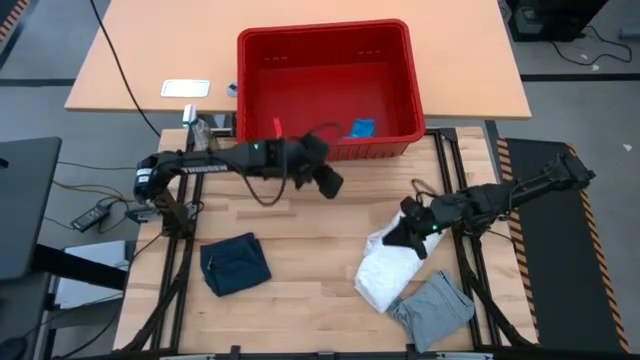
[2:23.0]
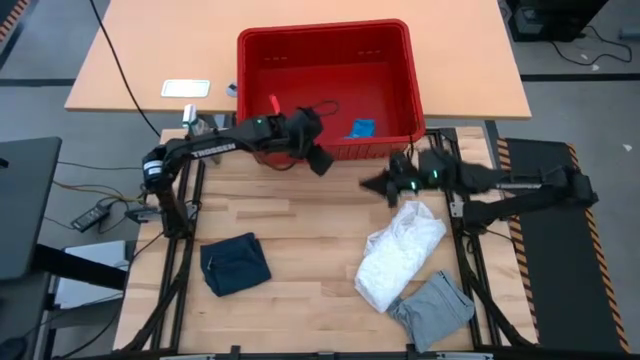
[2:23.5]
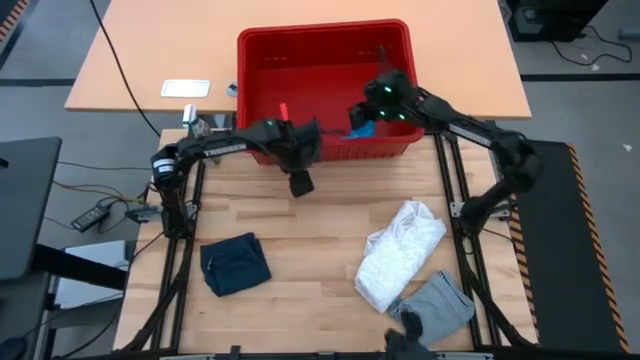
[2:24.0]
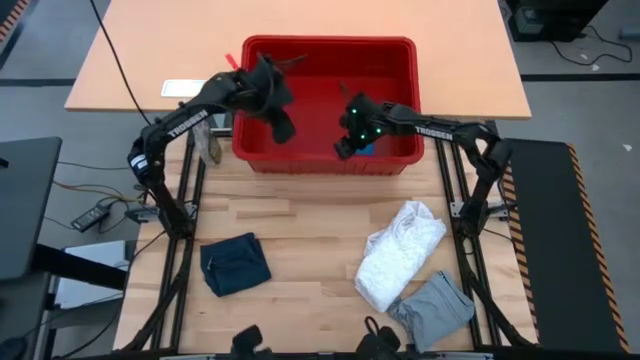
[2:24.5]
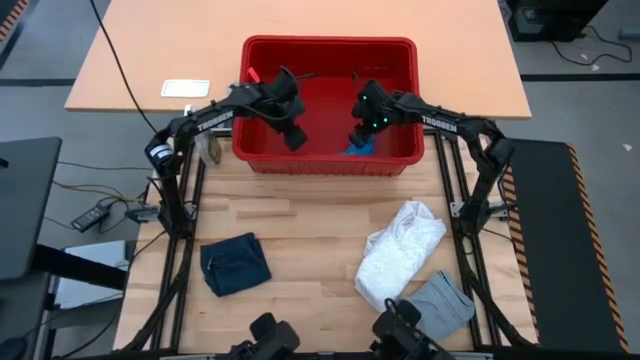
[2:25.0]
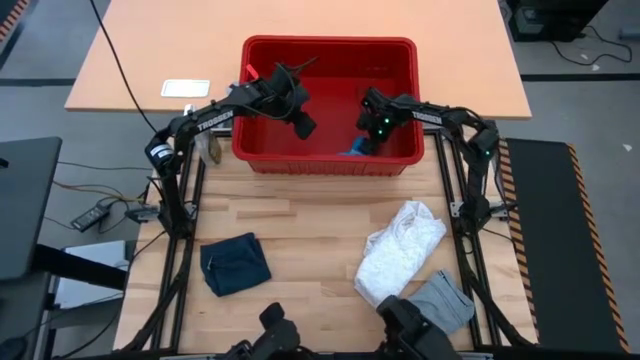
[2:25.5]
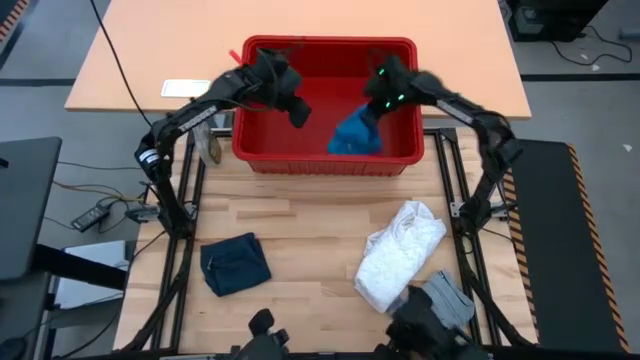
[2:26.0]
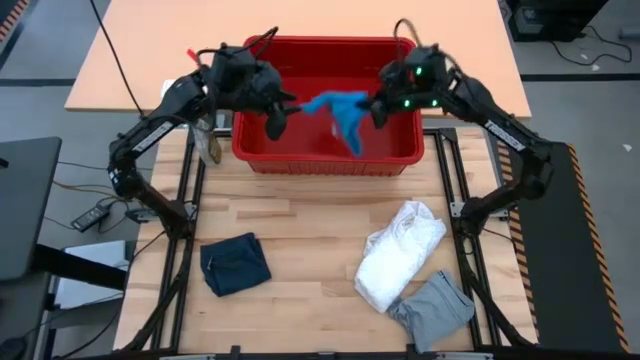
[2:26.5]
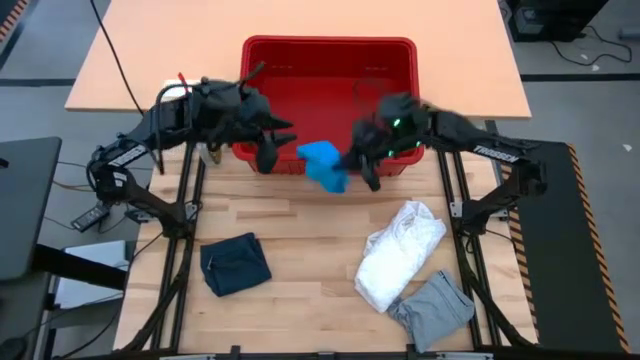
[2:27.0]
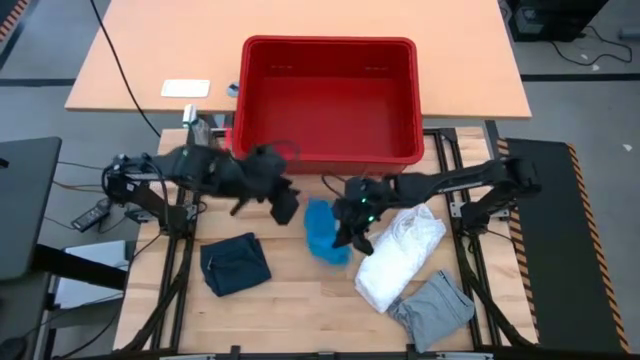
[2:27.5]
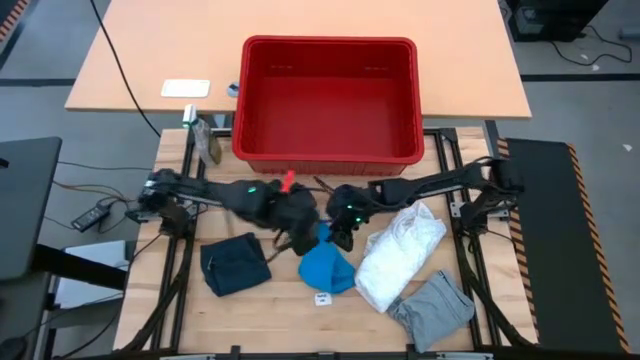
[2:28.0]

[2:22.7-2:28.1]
Task: Fold laundry
Remove the blue underwear from the red laundry bin

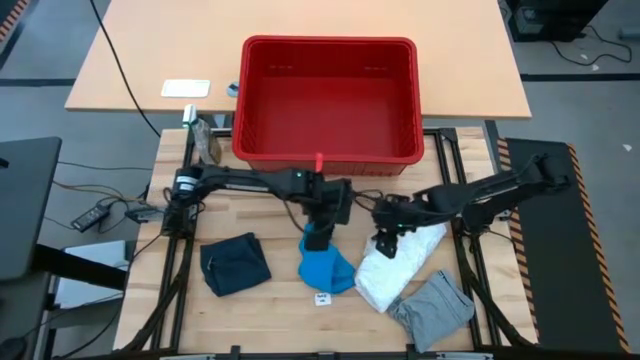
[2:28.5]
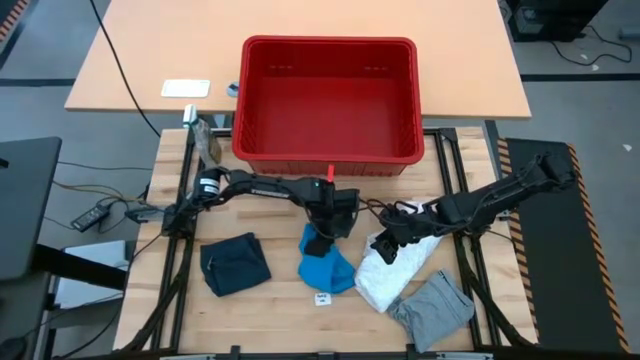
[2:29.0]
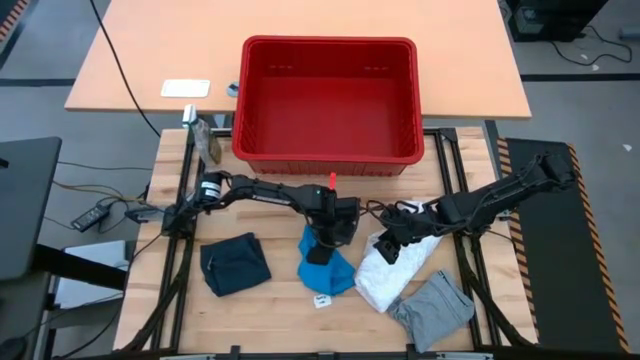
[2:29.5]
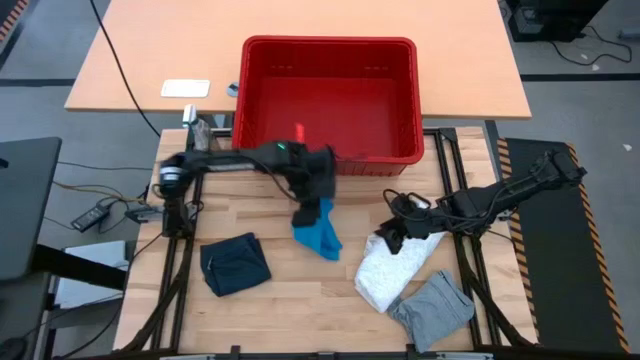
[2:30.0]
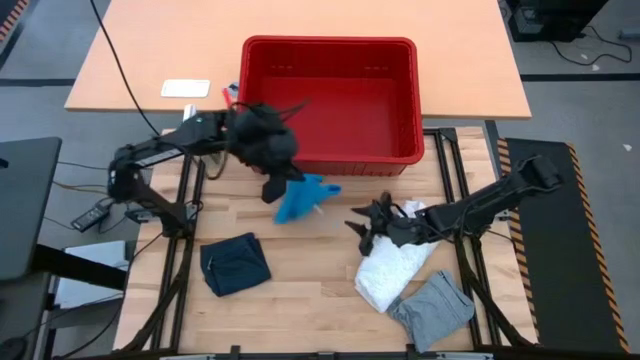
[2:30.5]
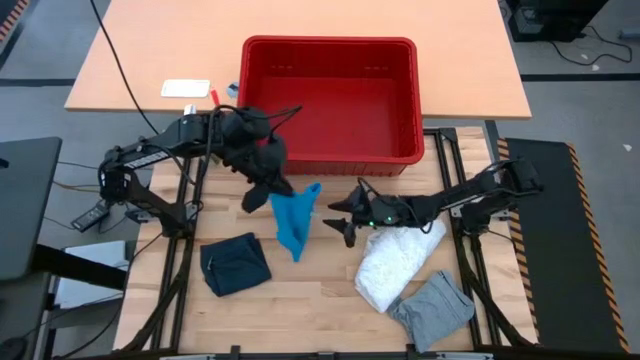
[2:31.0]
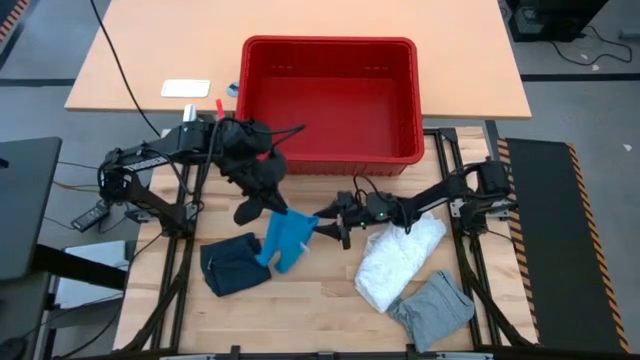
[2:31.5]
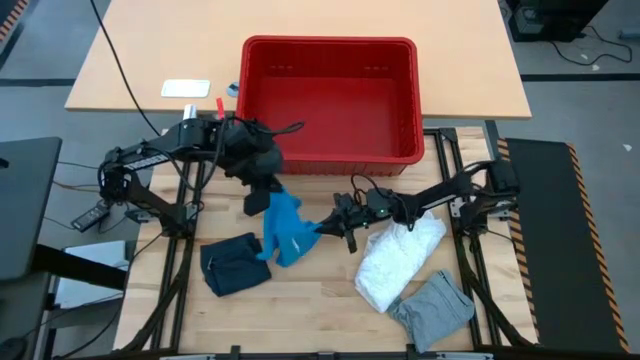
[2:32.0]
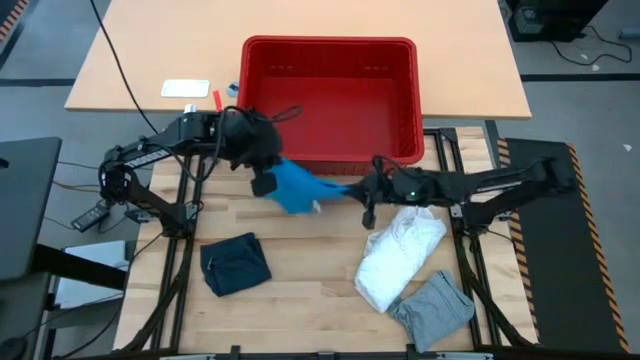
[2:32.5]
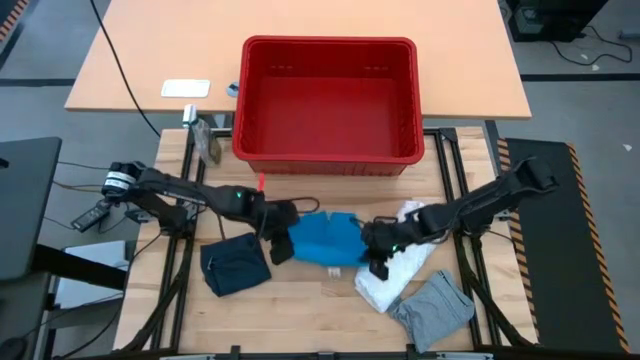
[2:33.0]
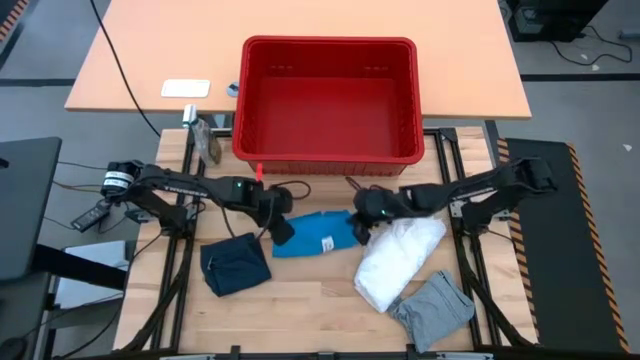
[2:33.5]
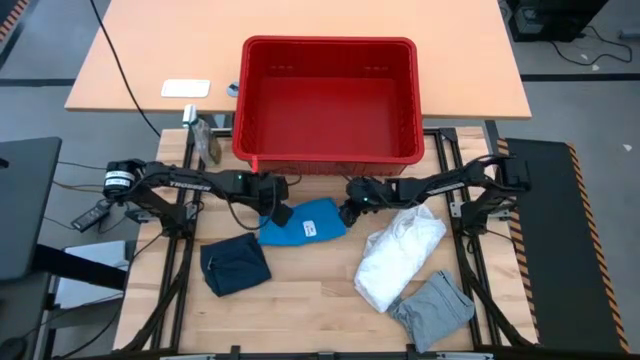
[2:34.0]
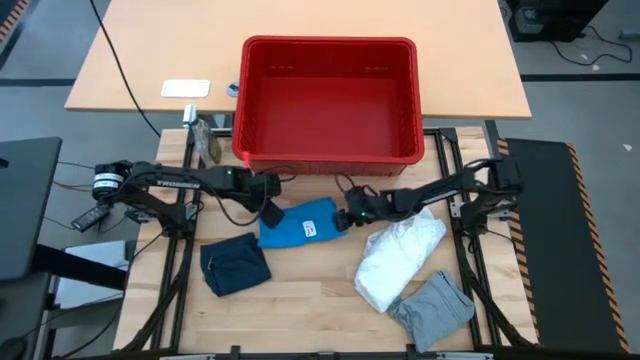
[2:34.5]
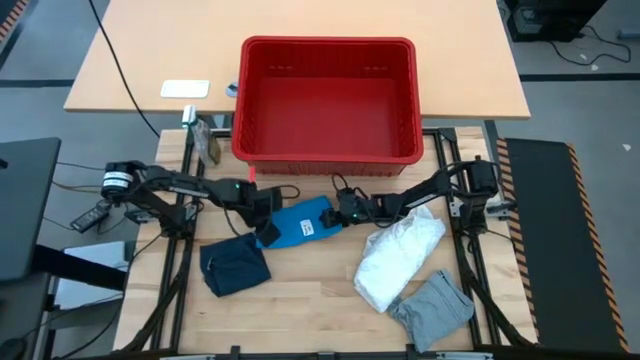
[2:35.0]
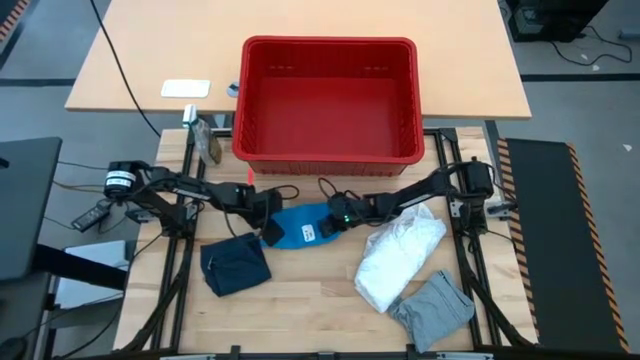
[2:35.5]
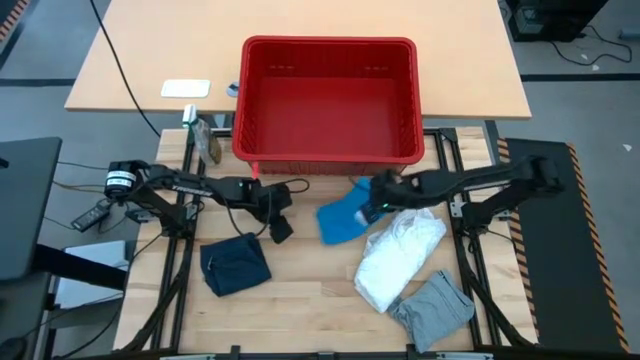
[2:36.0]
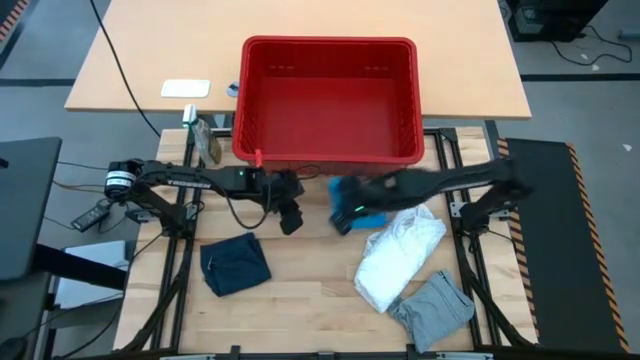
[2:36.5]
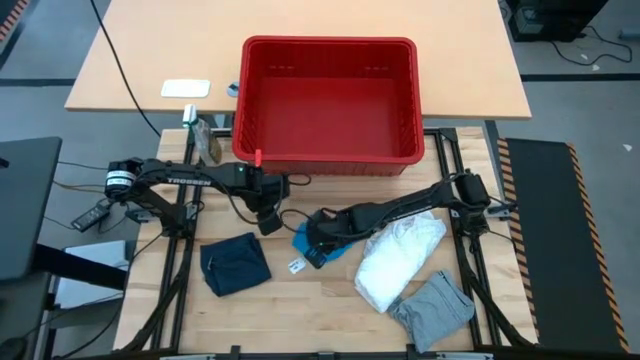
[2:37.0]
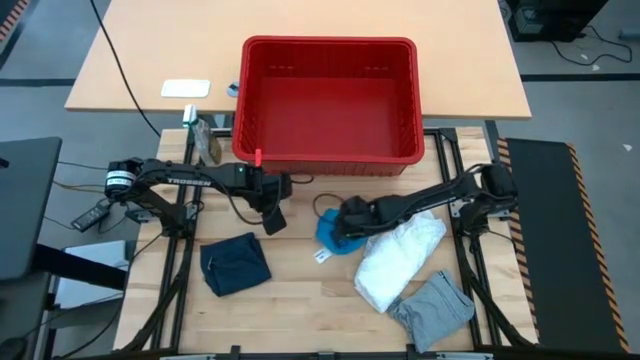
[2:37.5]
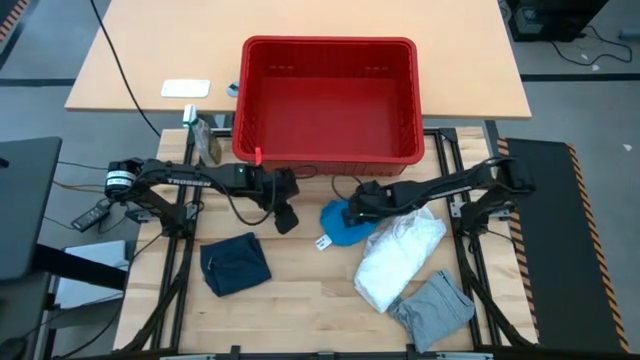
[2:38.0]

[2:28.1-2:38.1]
Fold the blue underwear

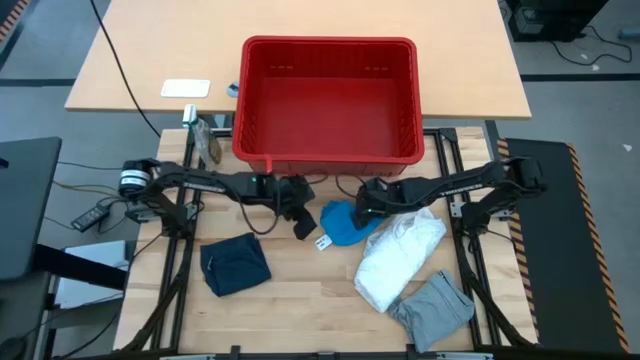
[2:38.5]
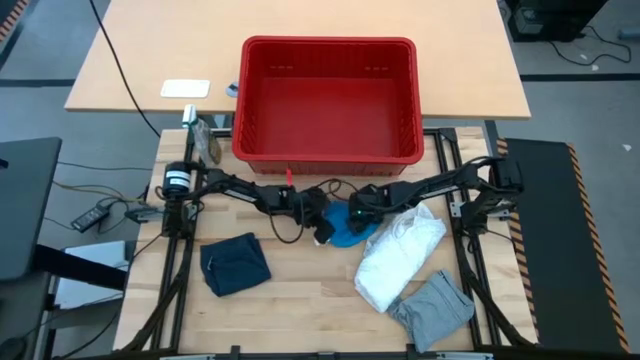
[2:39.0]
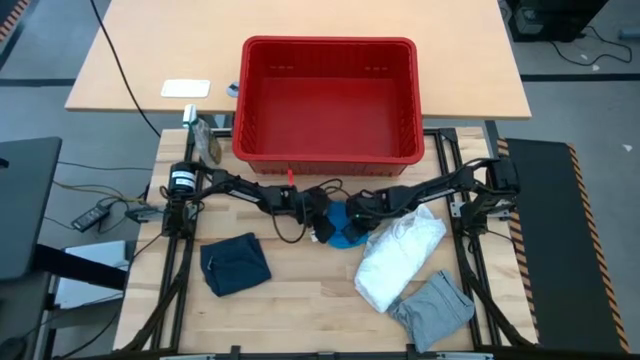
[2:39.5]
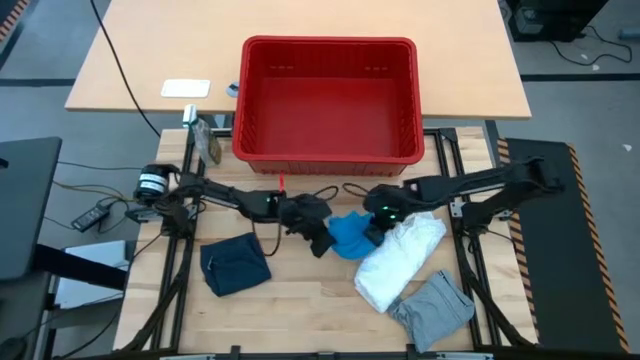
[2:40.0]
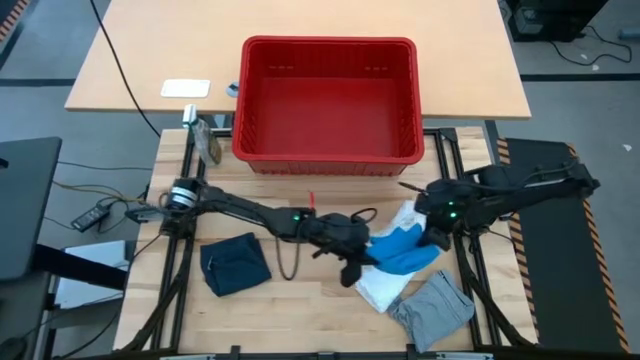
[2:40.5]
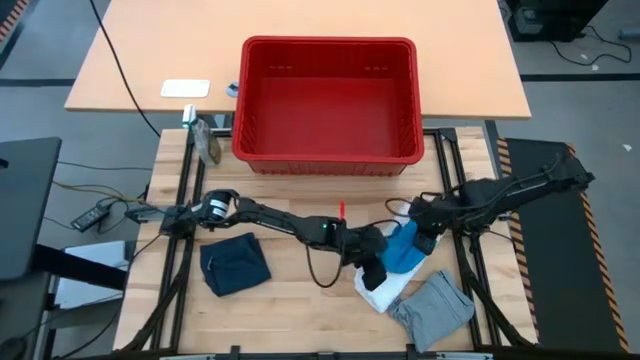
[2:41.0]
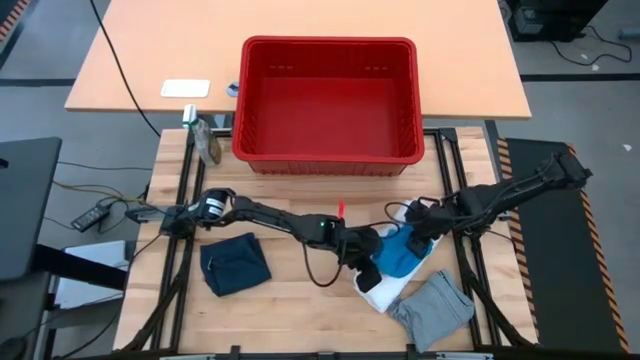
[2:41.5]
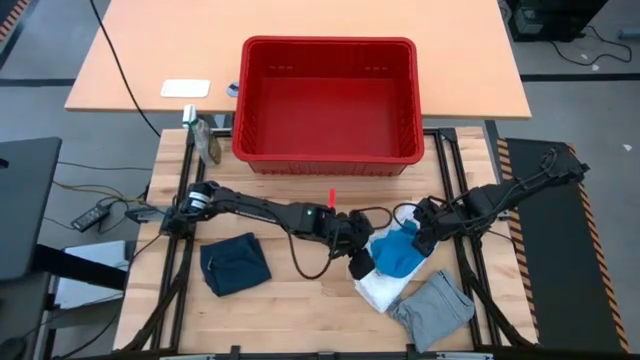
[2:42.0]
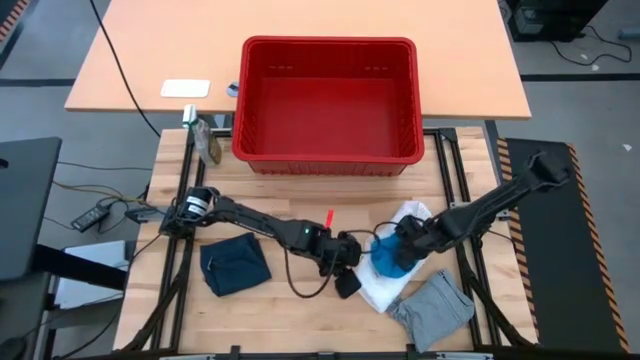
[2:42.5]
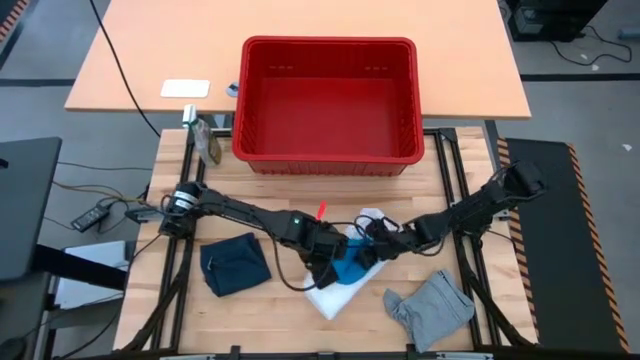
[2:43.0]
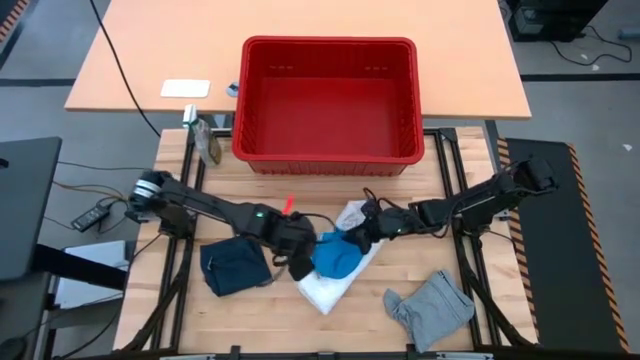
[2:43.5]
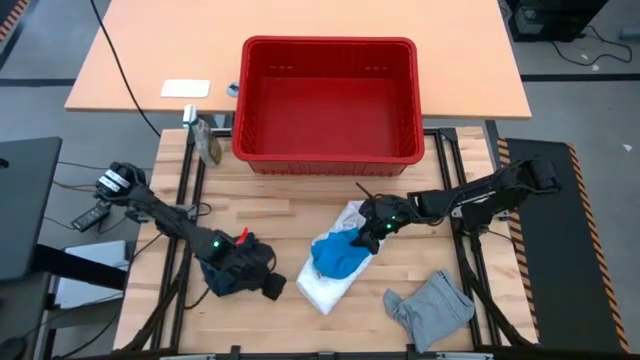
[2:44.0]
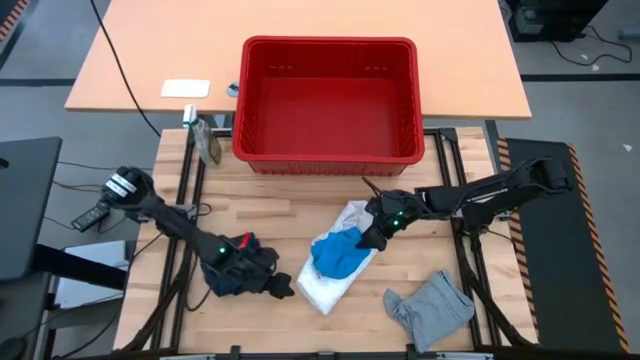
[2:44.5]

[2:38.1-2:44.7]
Stack the folded blue underwear on top of the folded white dress
